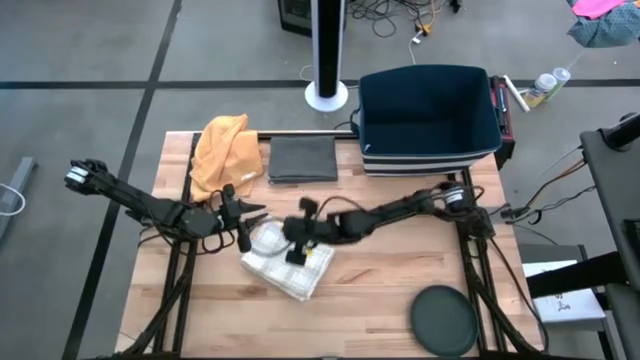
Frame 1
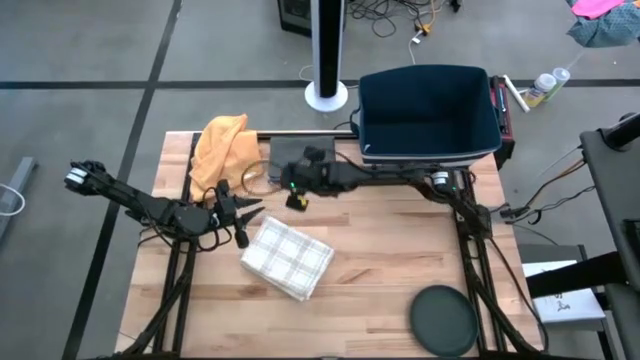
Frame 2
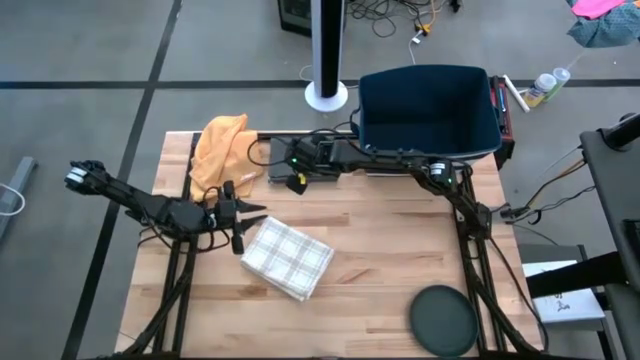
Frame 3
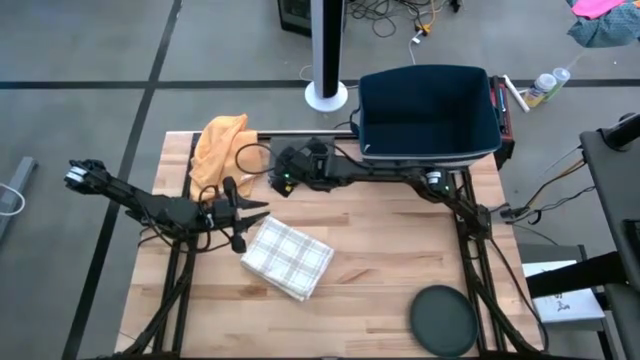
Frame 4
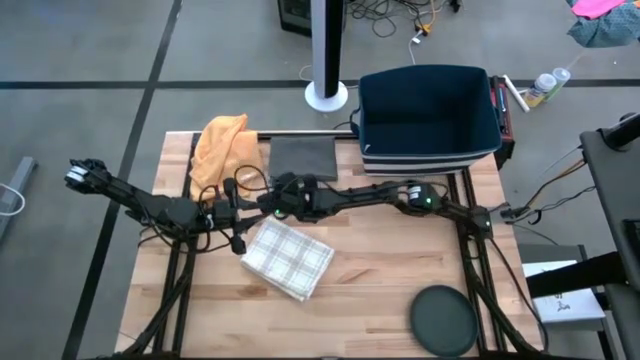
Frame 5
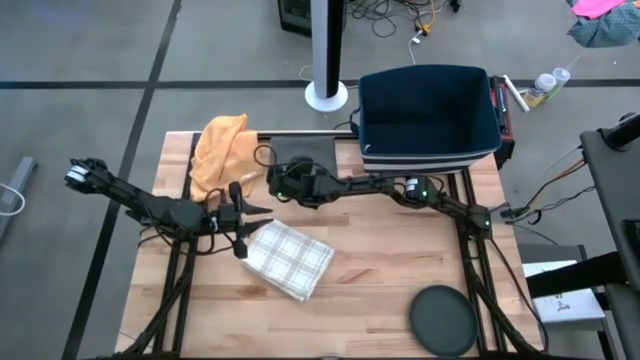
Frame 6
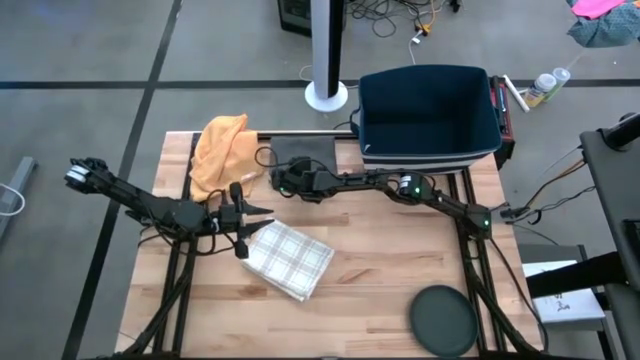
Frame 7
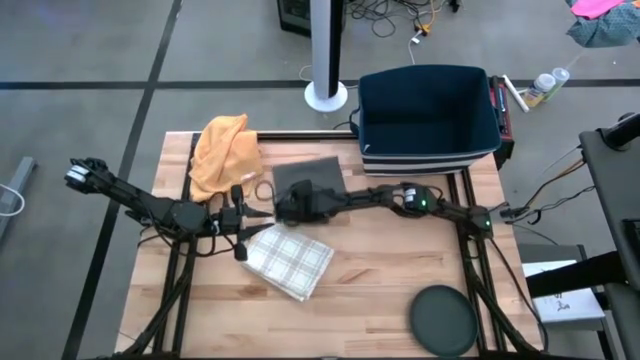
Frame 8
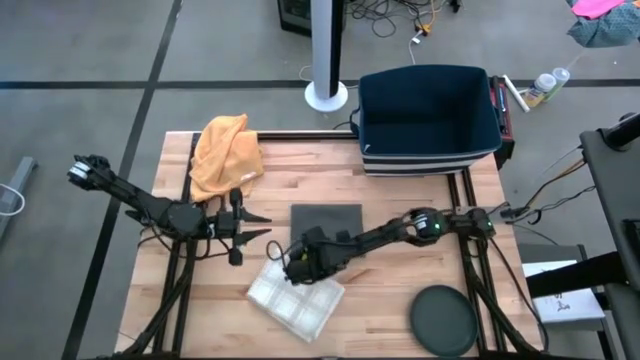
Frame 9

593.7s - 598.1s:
Task: Fold kitchen towel into neat rectangle
Move the gray towel to the center

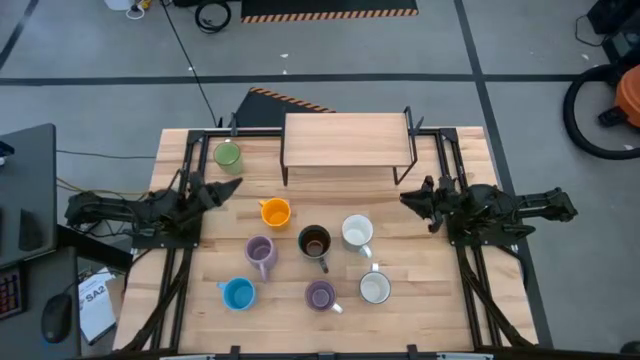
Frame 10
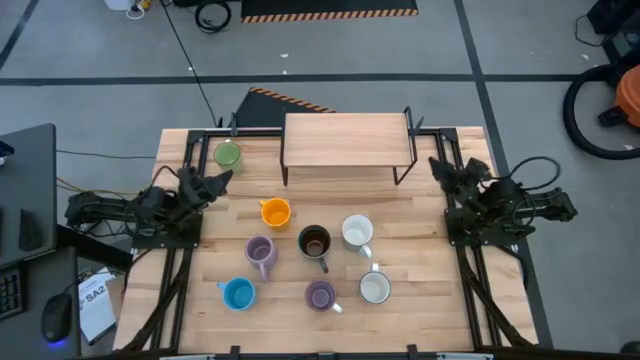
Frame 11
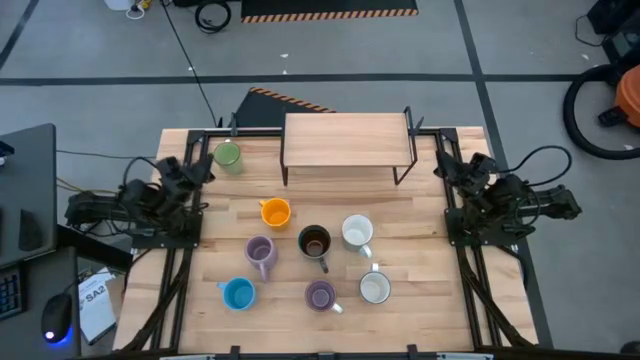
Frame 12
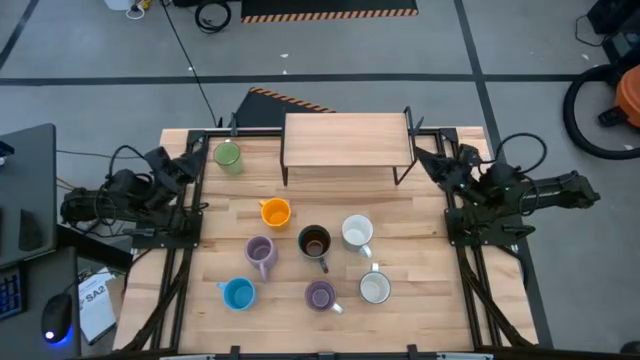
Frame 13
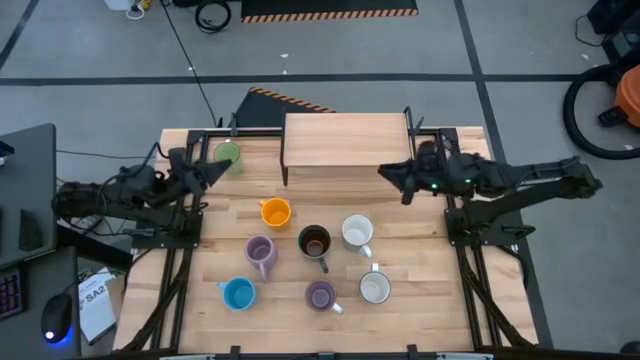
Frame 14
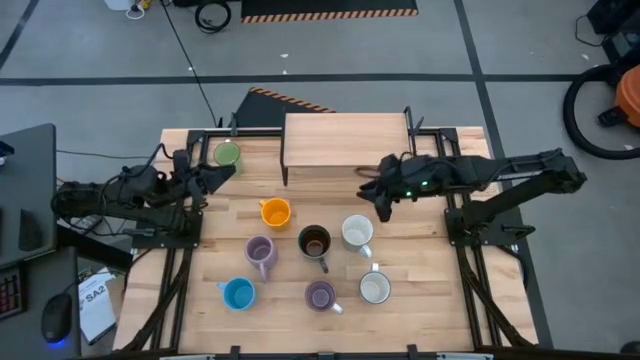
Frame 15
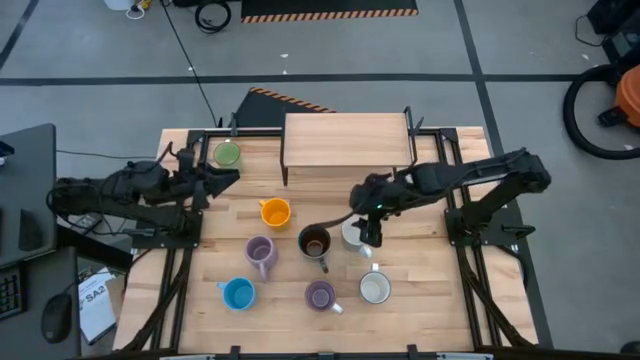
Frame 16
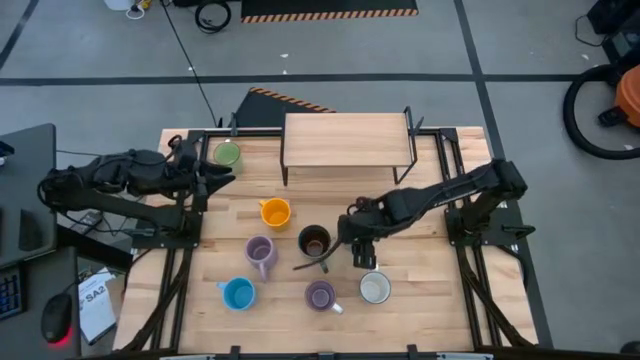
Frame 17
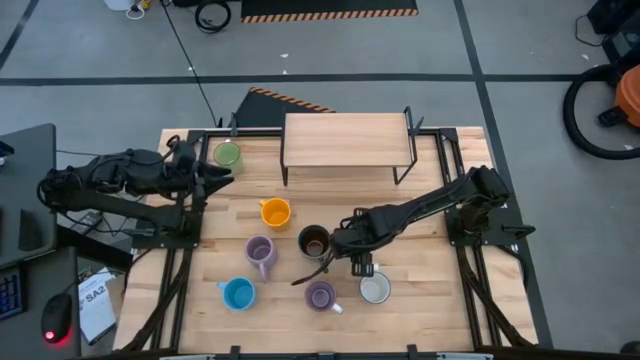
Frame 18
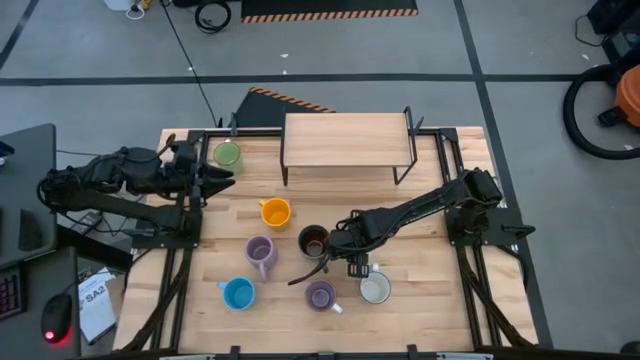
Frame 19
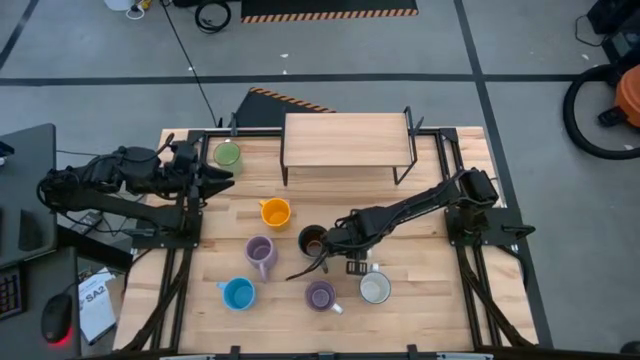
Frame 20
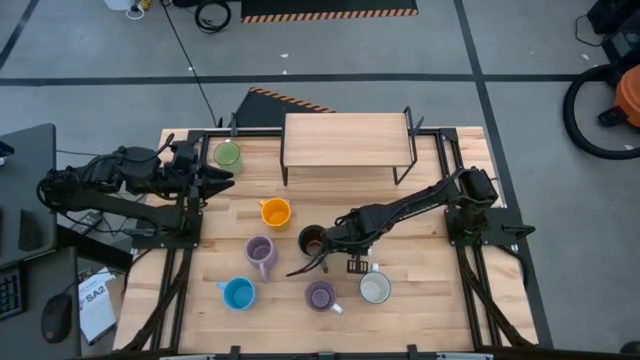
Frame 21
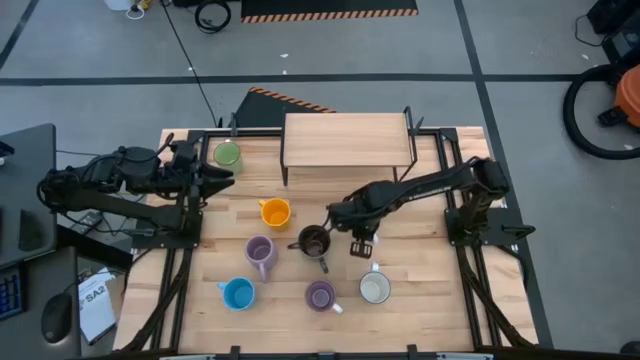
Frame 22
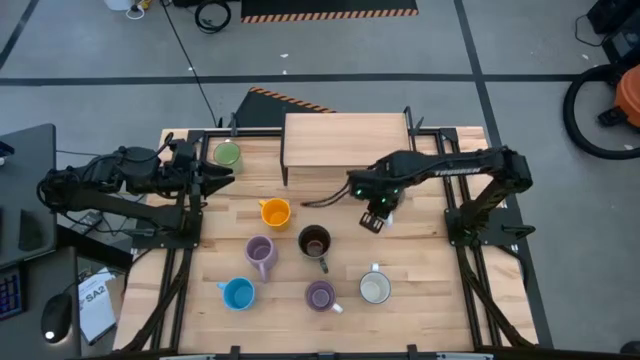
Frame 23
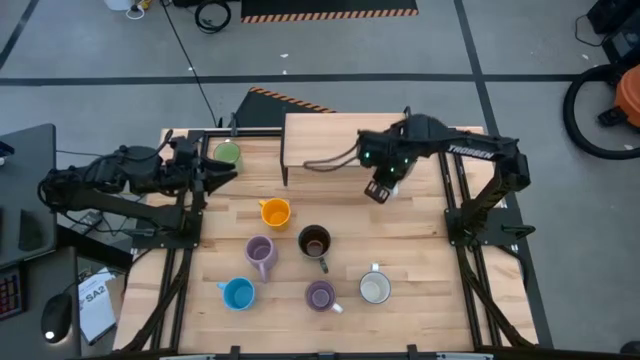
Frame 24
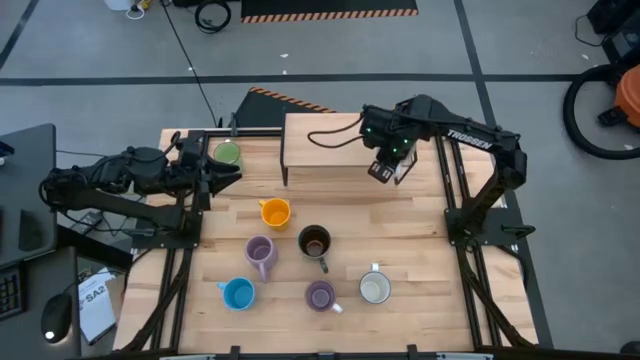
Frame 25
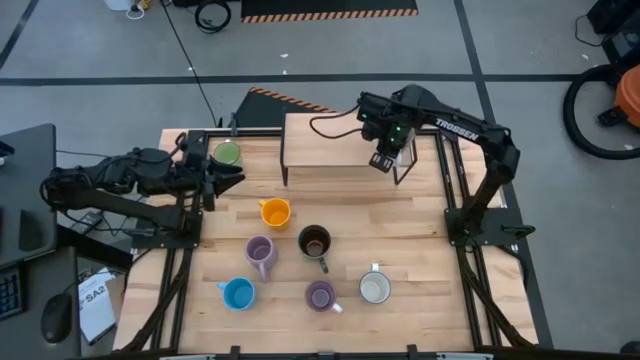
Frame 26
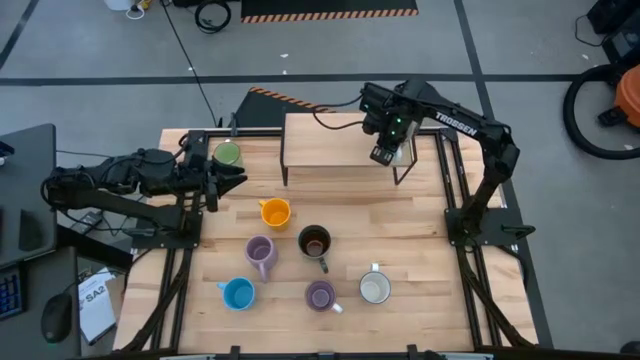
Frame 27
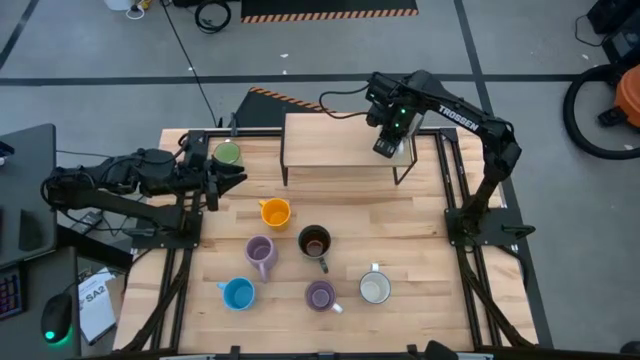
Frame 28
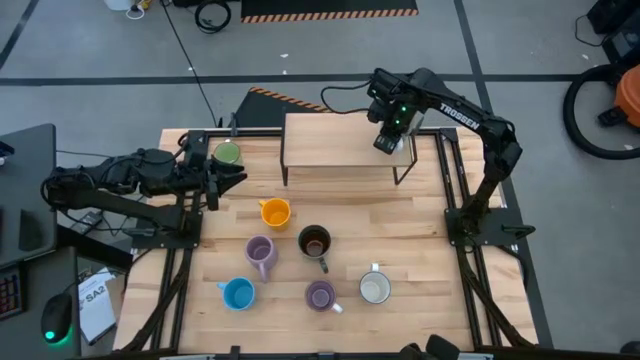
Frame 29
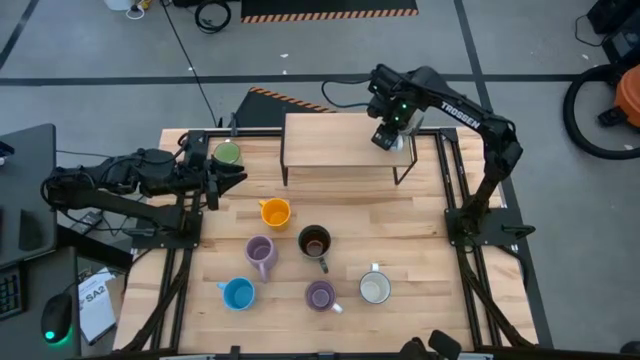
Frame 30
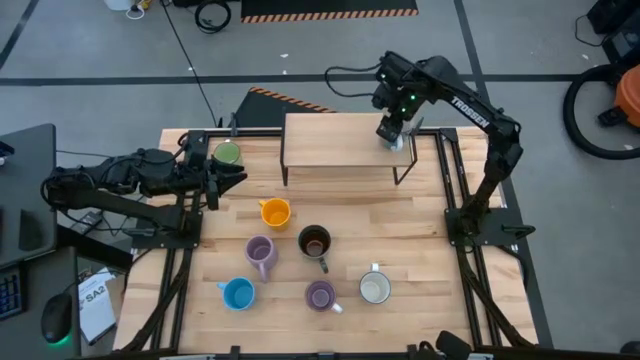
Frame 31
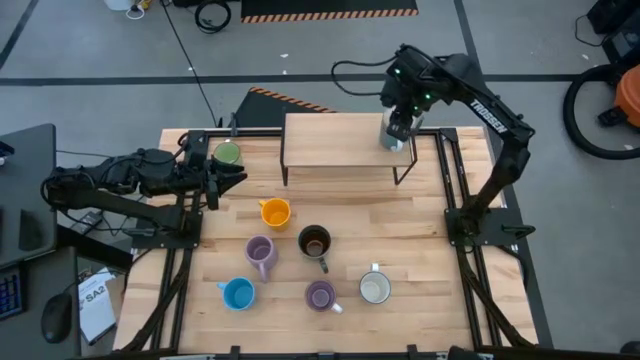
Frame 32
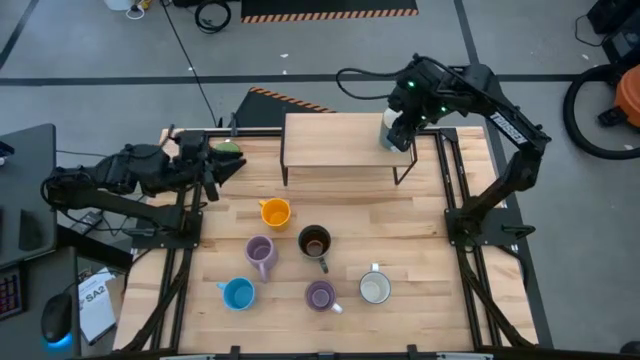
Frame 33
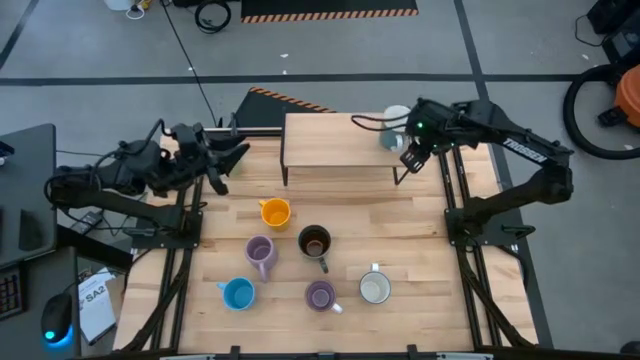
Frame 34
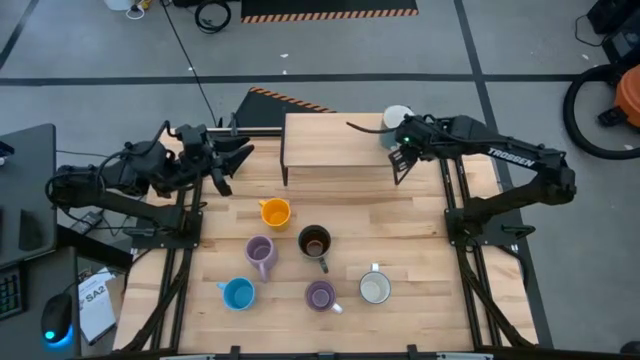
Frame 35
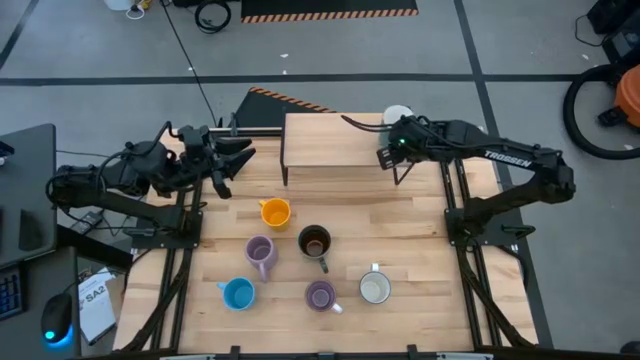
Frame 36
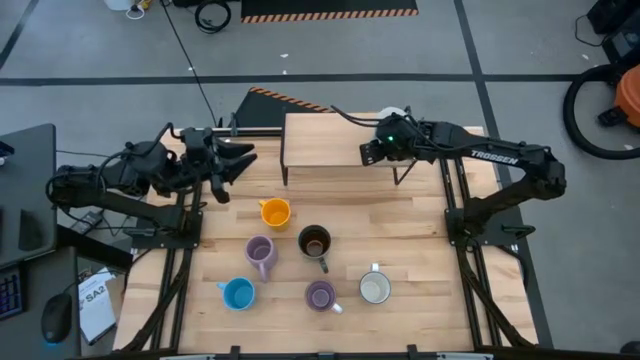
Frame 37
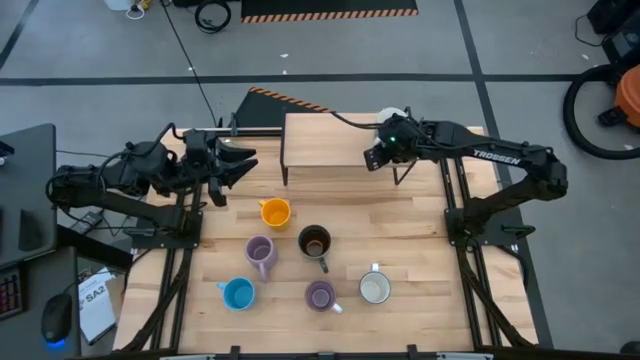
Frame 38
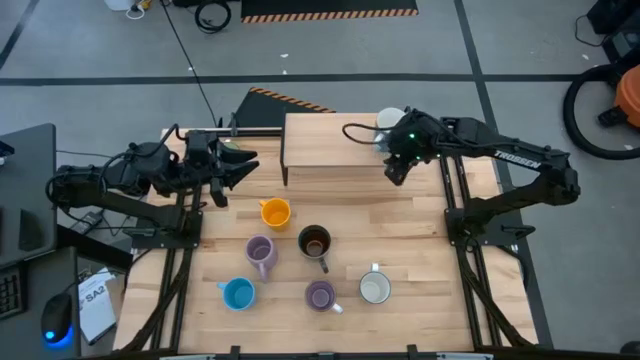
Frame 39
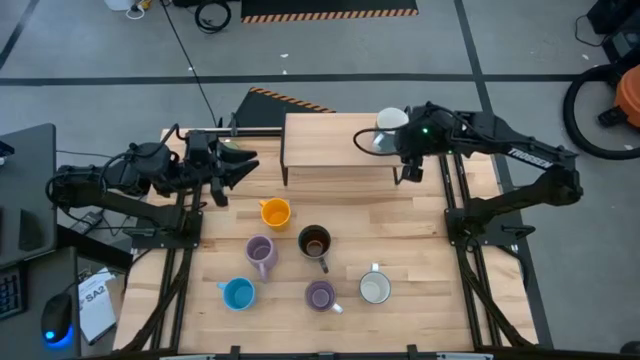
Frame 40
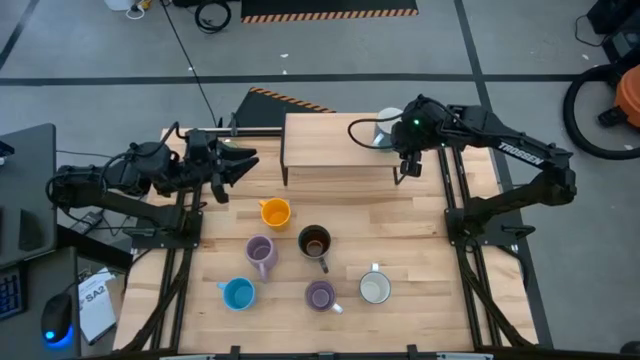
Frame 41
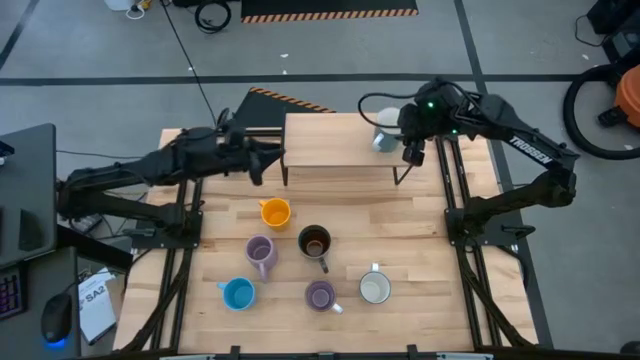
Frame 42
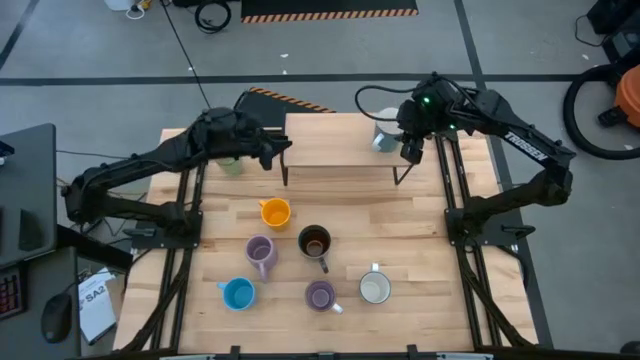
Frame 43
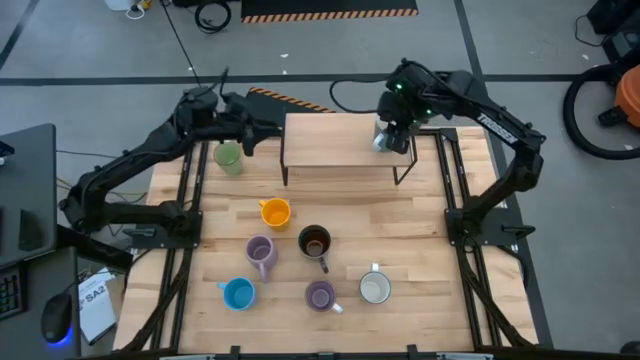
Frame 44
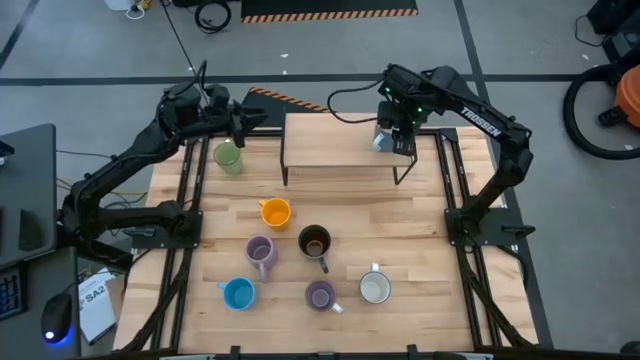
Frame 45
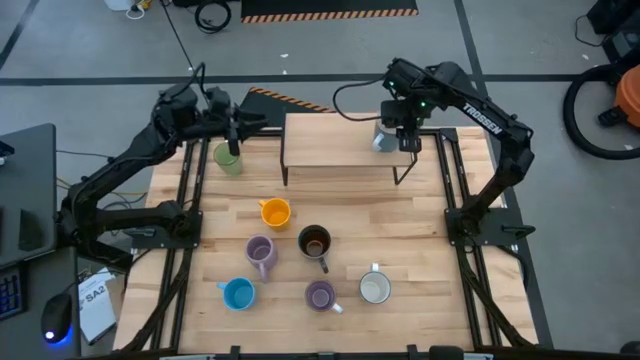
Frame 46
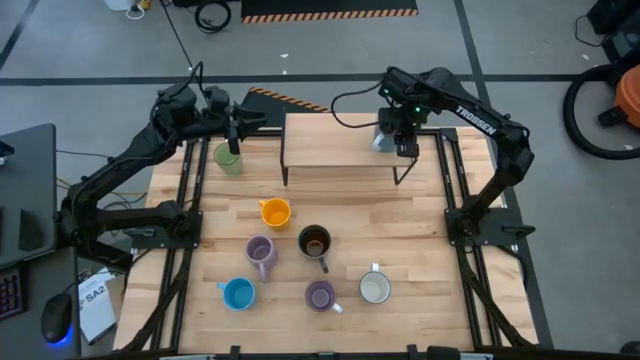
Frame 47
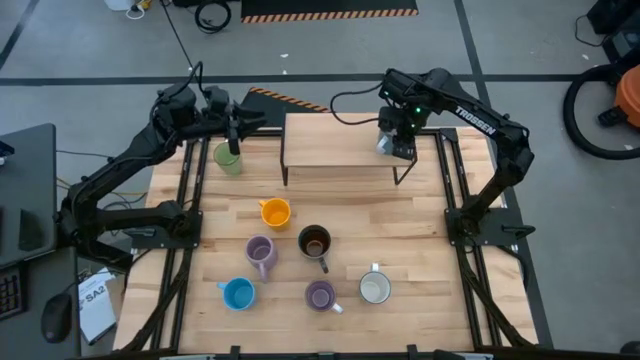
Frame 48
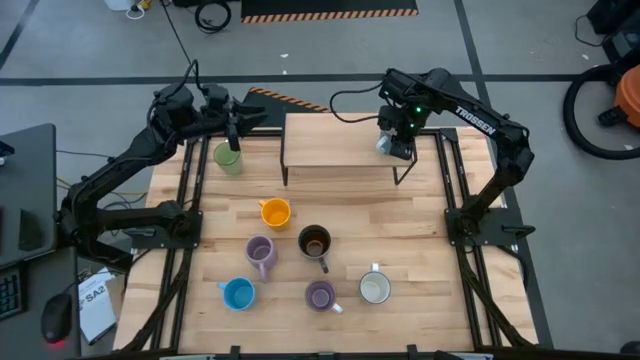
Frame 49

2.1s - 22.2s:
Task: Place coffee mugs
Put the blue and white mug on the shelf
